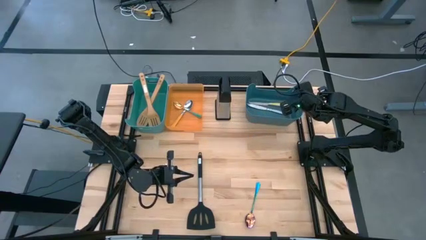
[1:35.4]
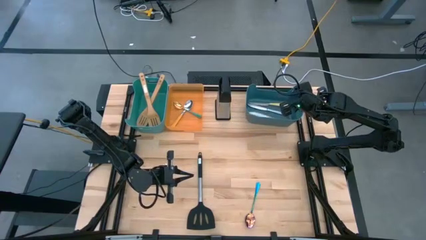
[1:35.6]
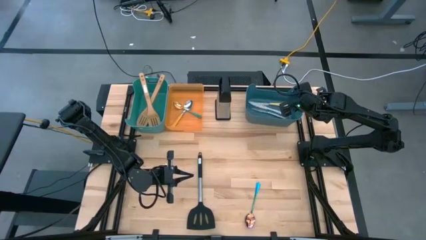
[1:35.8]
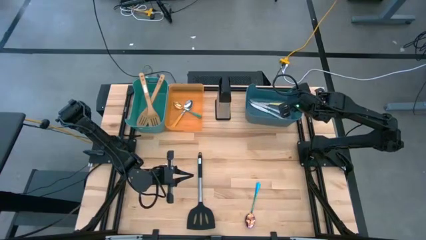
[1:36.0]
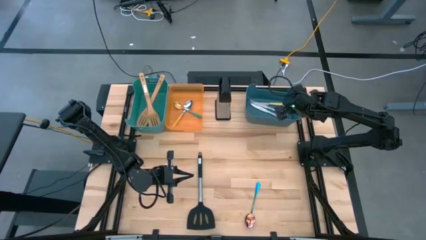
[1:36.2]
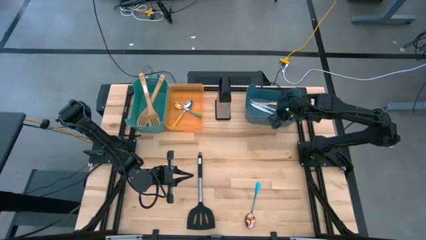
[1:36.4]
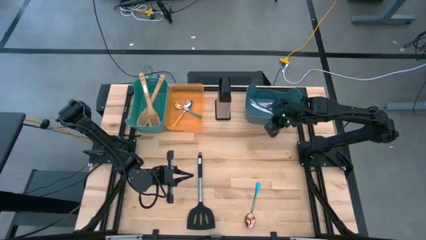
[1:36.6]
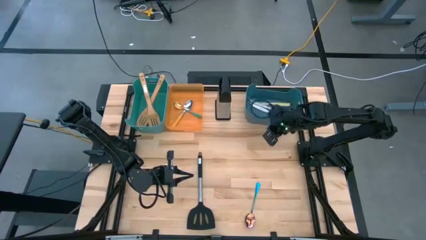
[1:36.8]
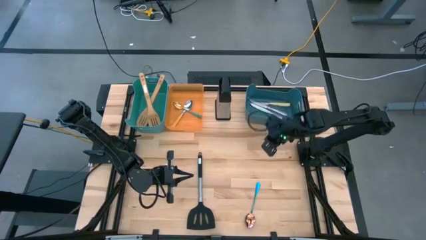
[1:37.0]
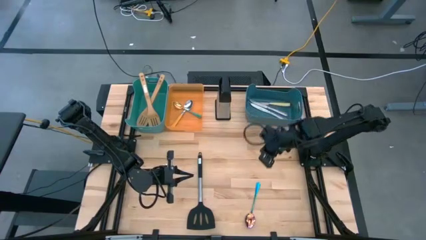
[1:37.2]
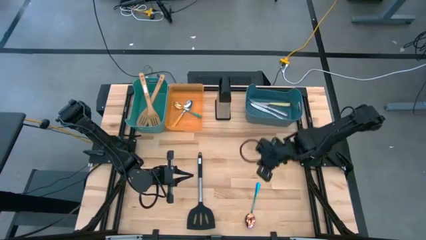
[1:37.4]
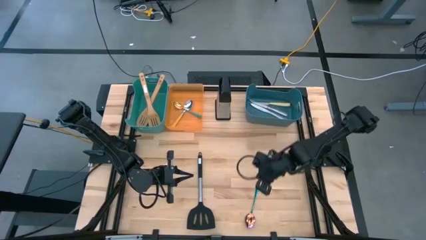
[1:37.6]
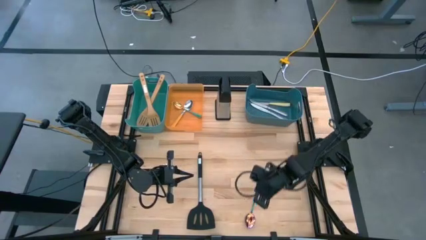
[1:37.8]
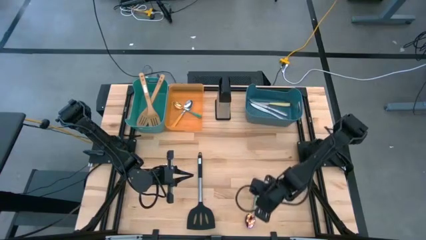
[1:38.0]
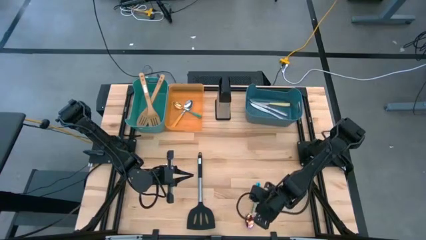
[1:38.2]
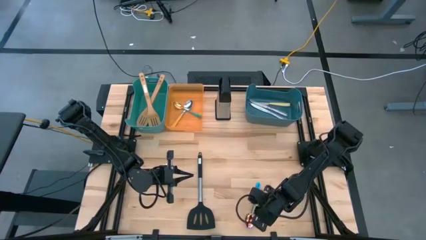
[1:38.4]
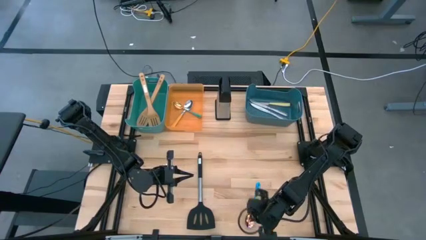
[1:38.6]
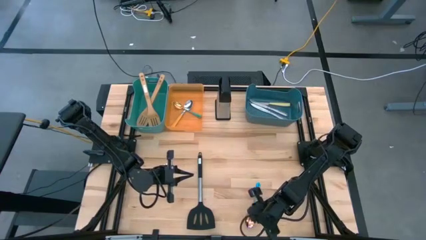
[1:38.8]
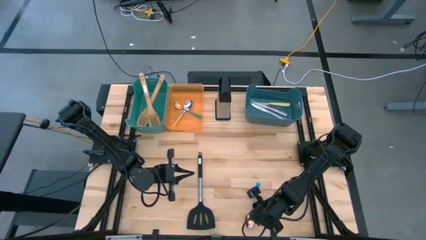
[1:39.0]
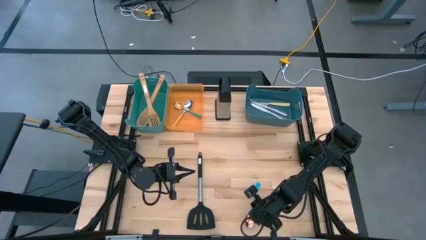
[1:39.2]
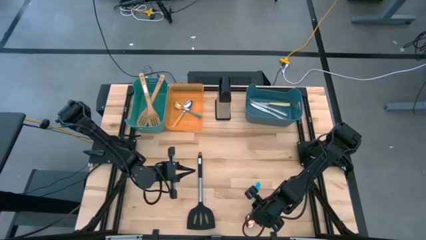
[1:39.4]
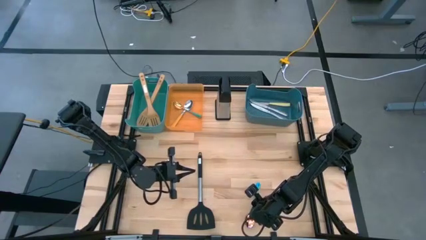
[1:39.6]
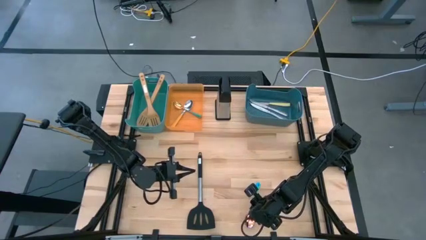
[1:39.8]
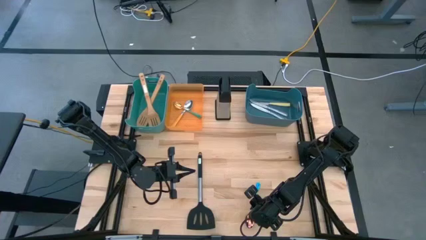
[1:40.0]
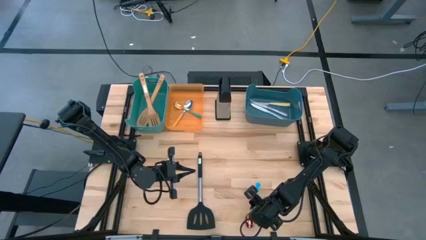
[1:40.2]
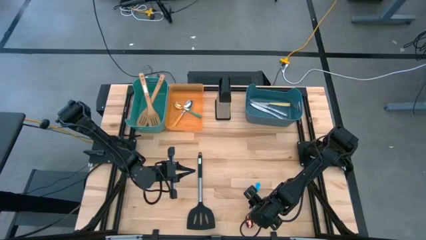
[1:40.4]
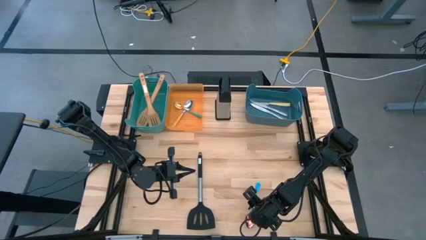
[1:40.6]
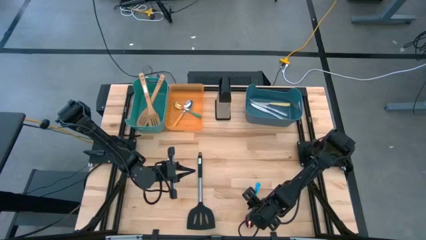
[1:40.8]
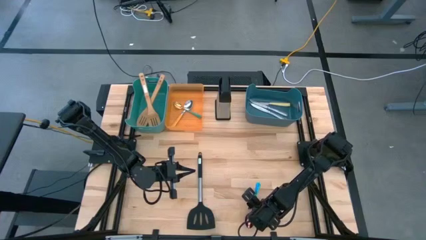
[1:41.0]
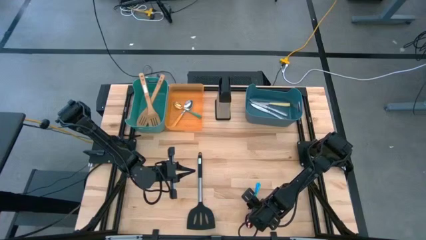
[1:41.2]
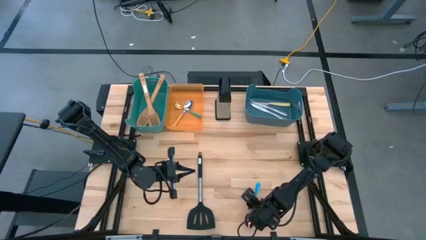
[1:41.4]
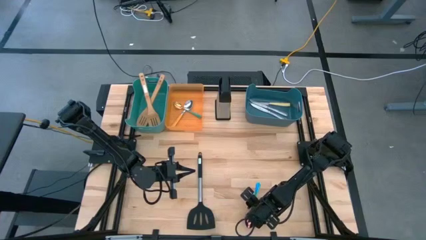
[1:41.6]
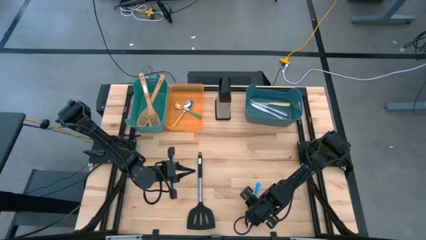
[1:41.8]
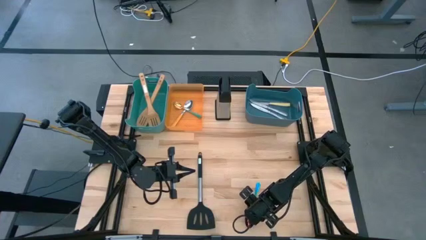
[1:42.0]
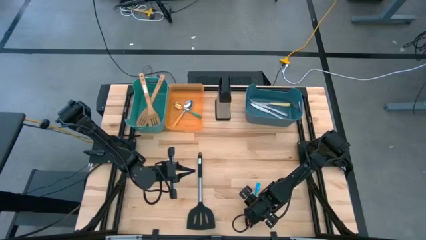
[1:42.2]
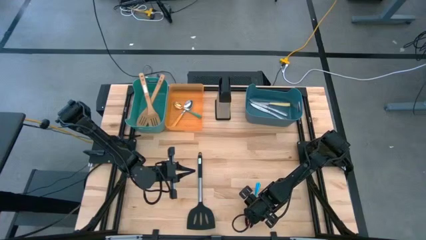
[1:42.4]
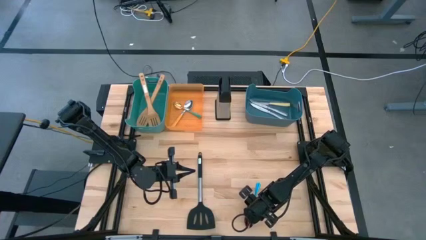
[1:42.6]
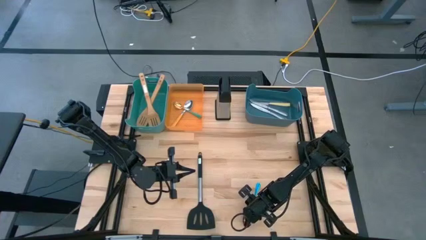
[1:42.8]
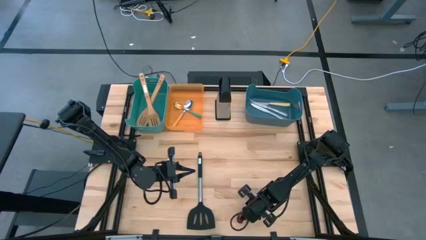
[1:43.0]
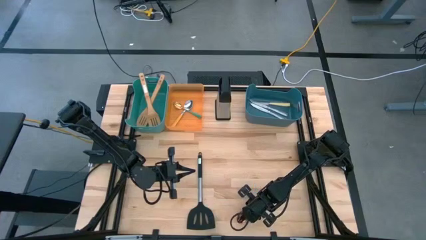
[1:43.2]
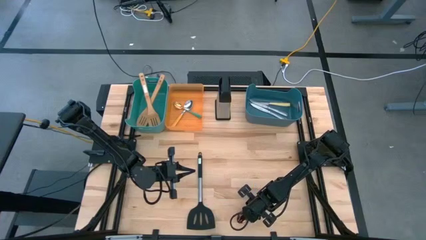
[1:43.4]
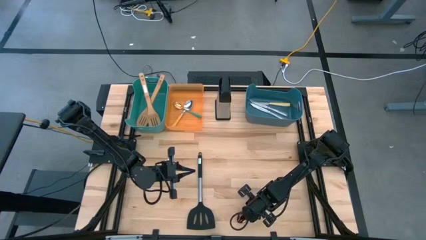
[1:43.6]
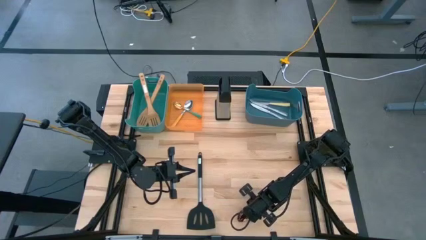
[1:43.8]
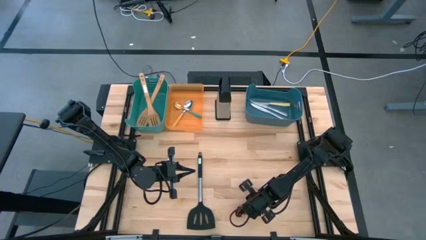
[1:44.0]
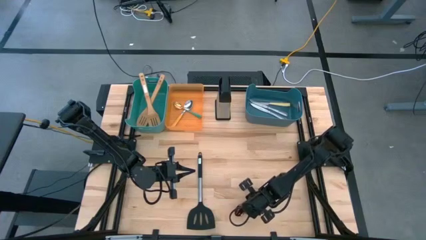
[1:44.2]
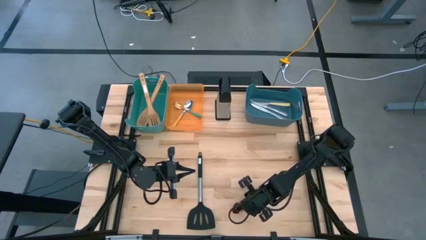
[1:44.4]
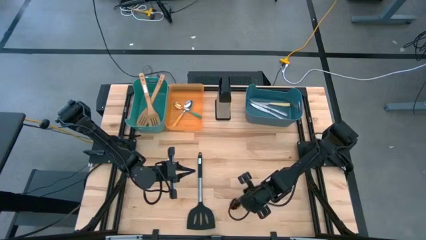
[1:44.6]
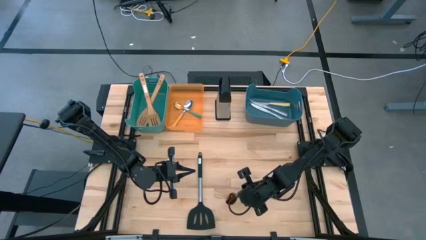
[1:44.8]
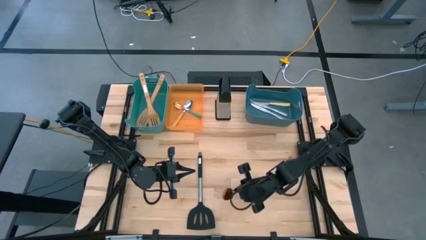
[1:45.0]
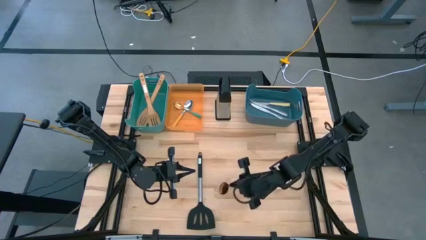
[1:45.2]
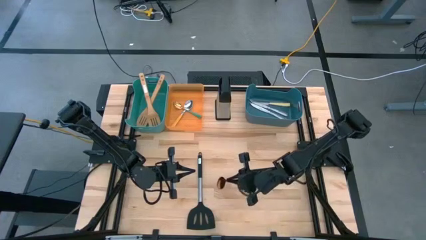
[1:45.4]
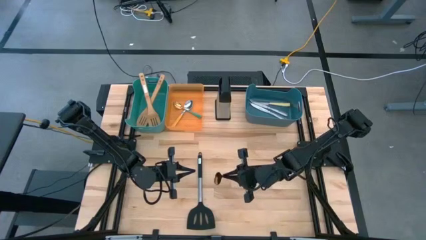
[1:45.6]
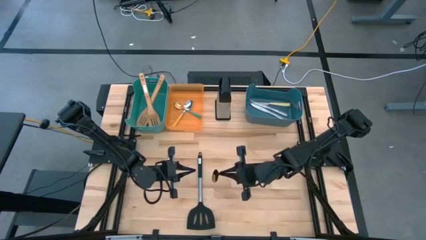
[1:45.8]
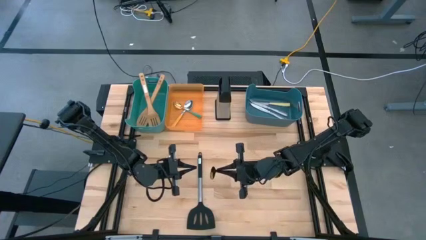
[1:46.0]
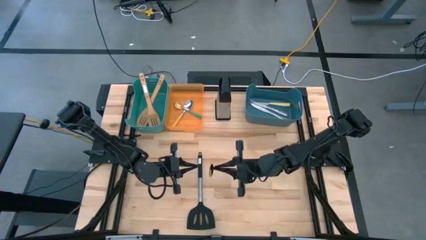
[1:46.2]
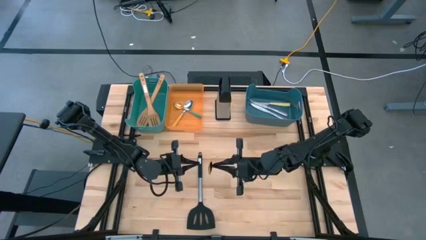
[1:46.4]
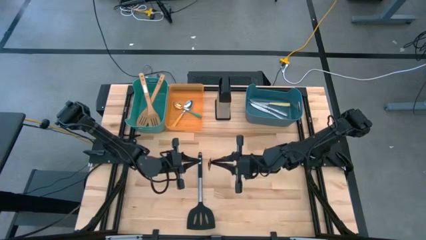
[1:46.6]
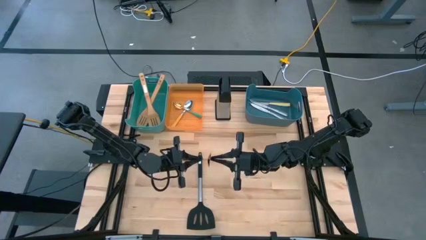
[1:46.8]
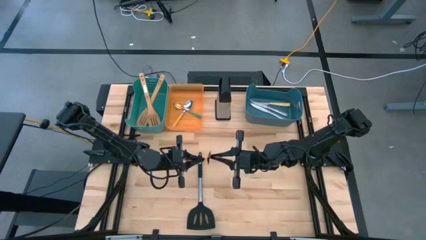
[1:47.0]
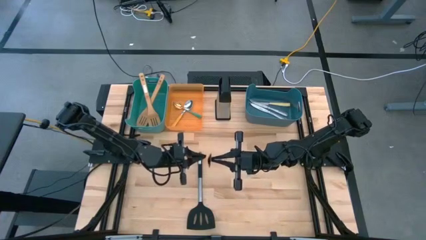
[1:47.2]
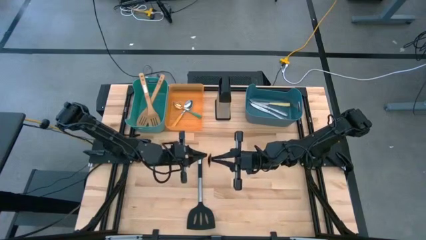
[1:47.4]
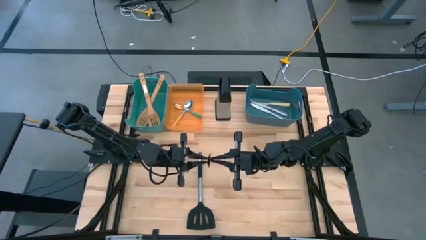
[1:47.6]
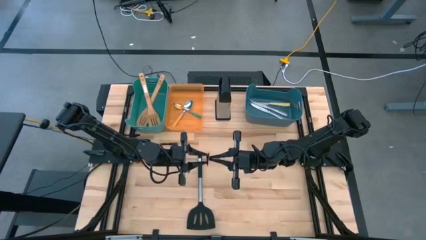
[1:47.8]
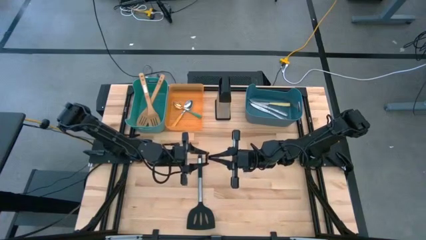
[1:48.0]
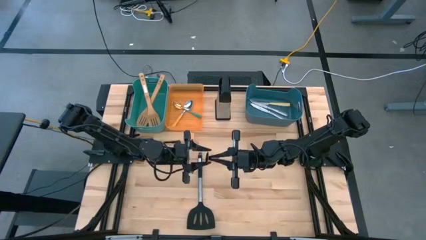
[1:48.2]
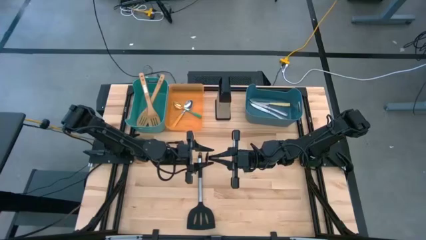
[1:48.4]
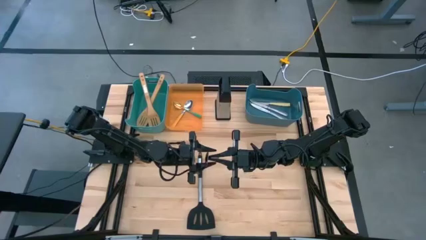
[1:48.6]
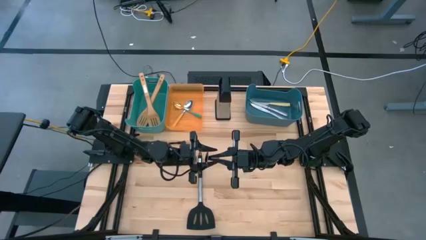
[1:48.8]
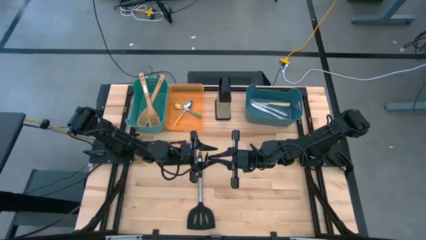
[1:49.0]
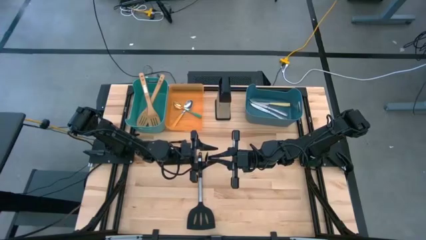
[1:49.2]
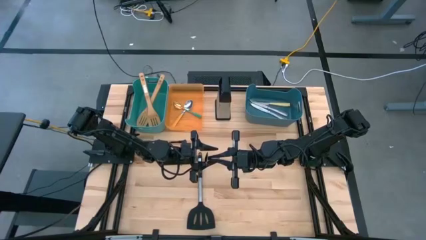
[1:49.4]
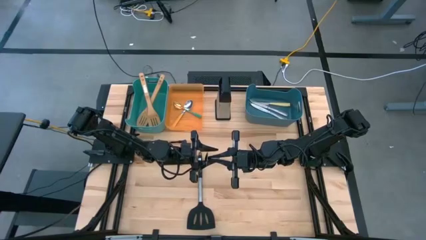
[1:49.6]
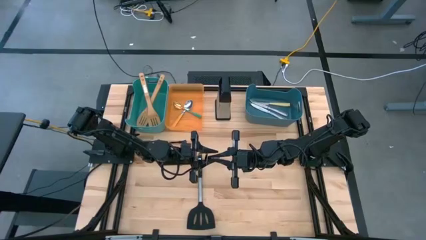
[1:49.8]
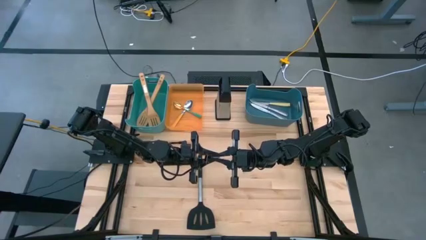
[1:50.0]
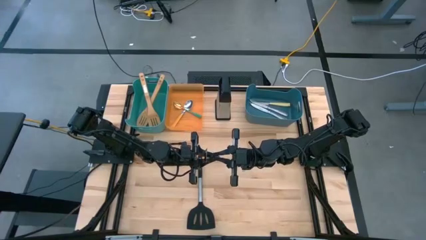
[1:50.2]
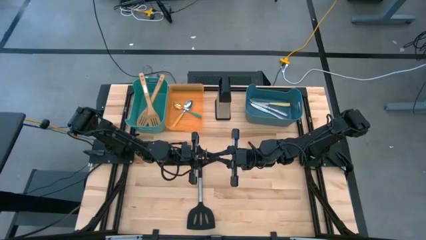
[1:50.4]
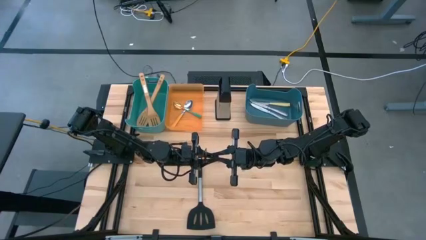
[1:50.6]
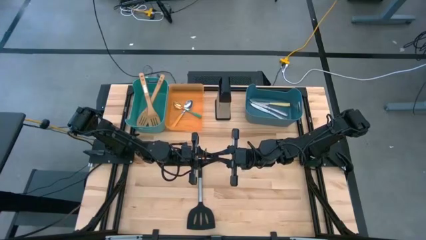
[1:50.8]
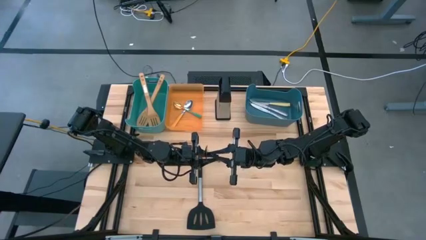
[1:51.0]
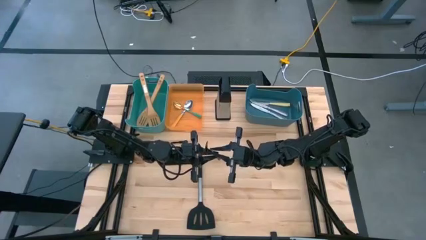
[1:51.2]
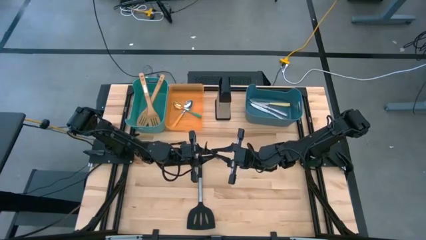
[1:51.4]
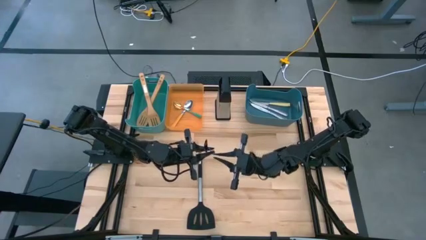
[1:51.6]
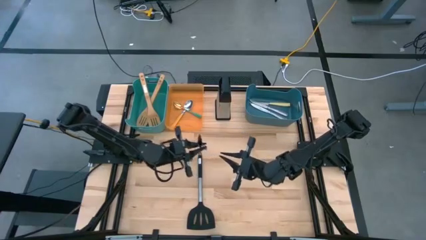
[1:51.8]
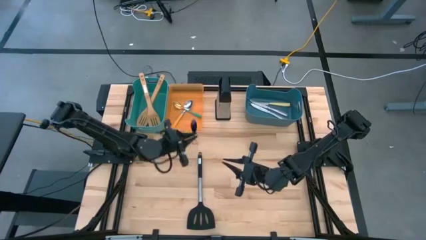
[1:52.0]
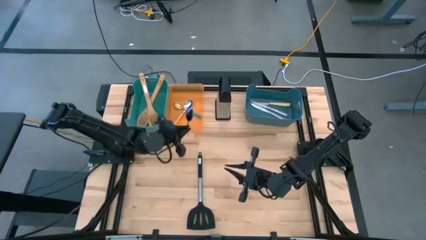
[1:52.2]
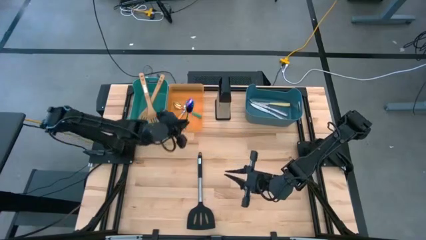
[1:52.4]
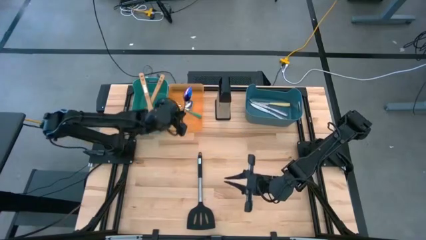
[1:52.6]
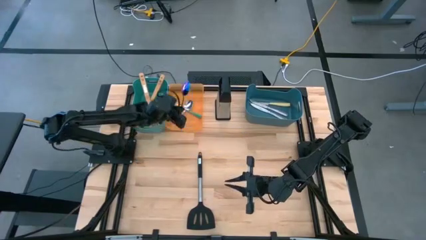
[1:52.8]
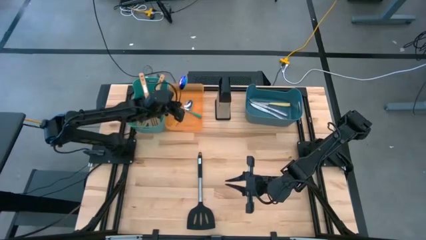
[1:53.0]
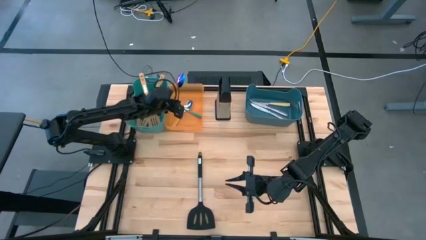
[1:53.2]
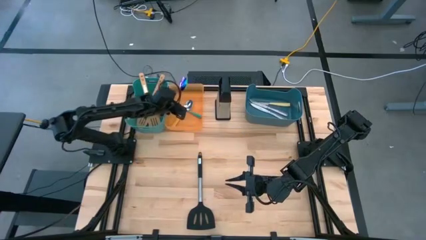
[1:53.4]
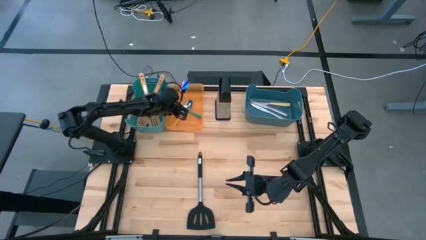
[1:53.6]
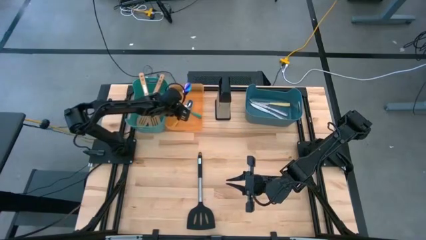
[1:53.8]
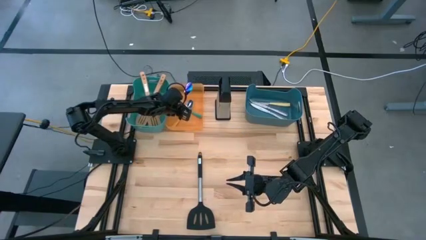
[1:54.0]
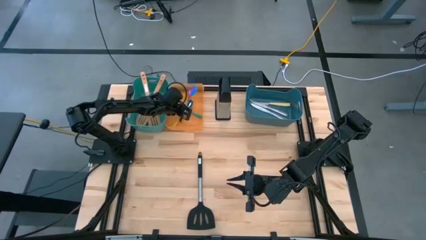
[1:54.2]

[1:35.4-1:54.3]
Task: Pick & Place Kitchen Items
Put the blue spoon into the orange bin
